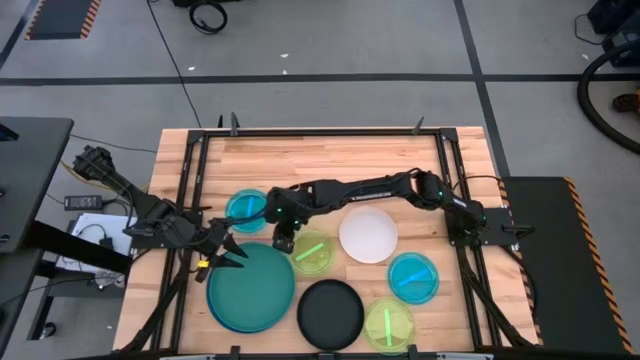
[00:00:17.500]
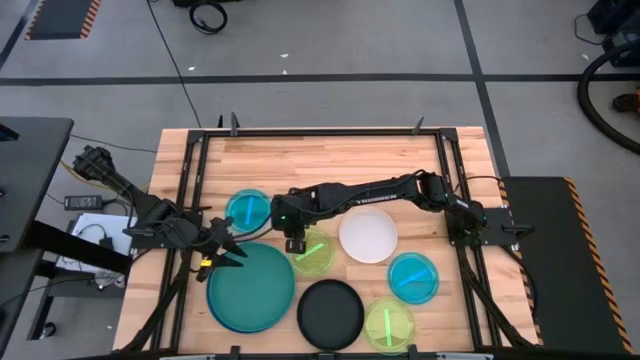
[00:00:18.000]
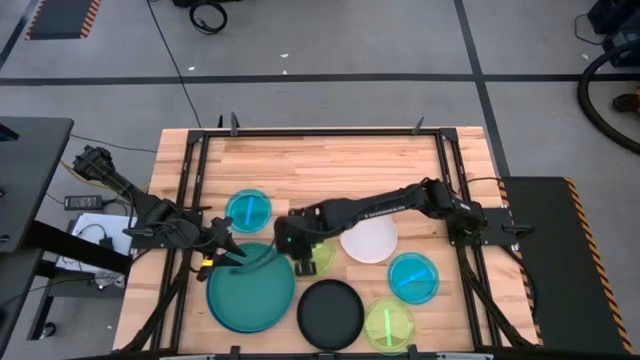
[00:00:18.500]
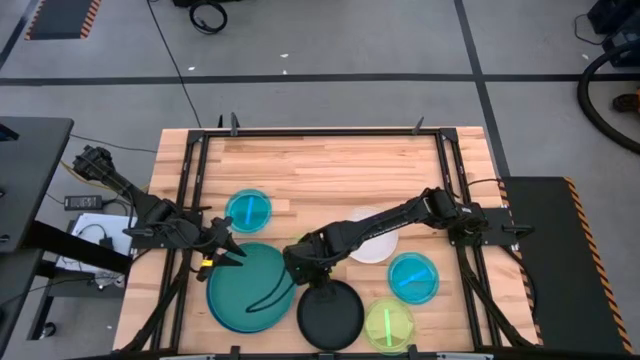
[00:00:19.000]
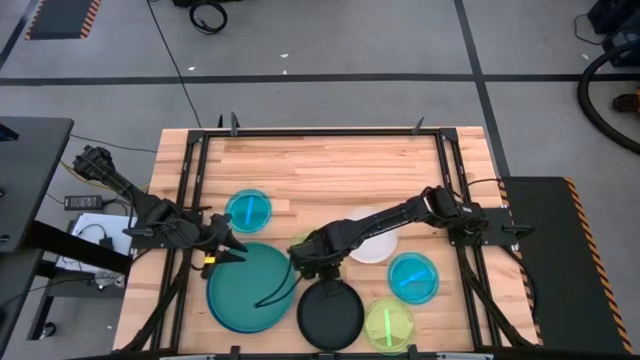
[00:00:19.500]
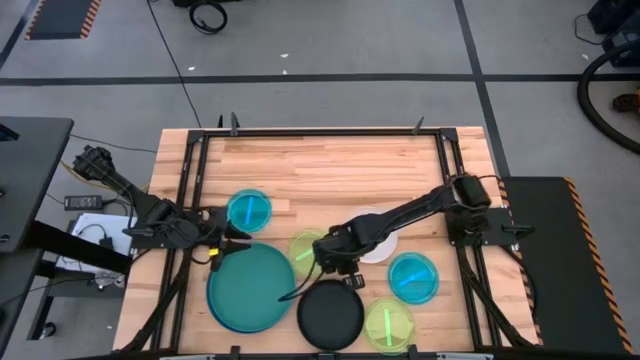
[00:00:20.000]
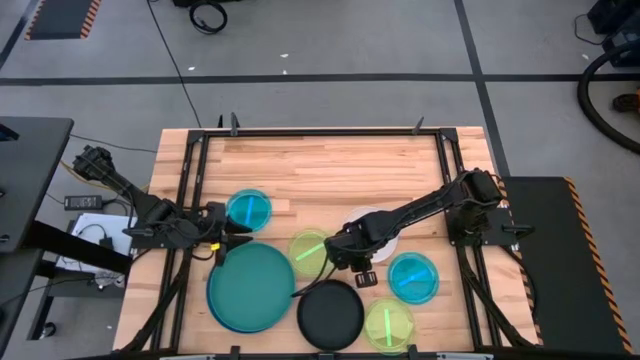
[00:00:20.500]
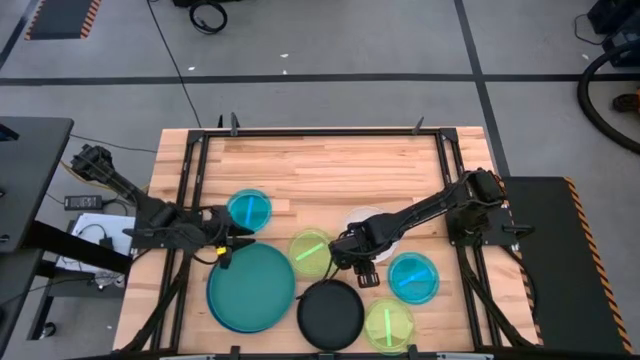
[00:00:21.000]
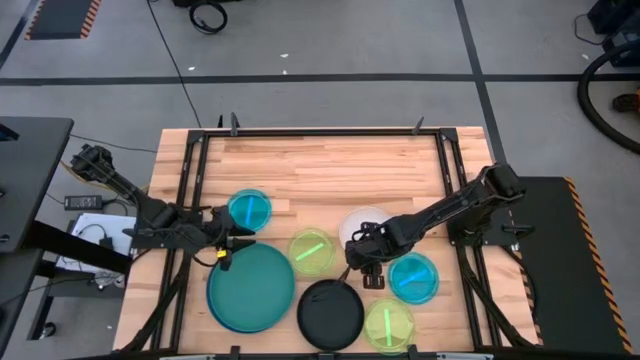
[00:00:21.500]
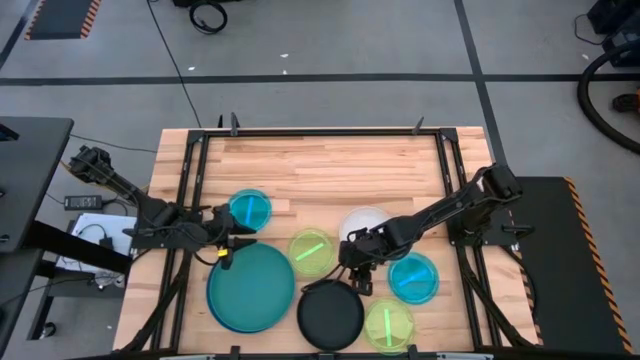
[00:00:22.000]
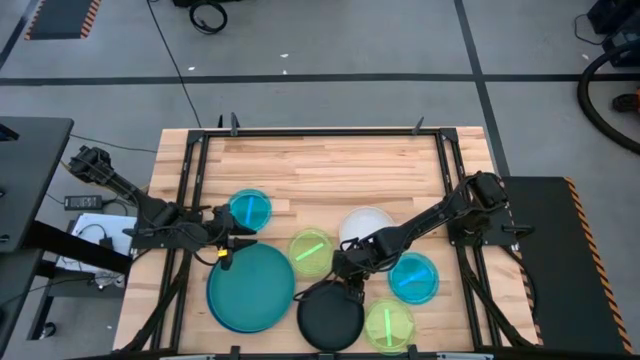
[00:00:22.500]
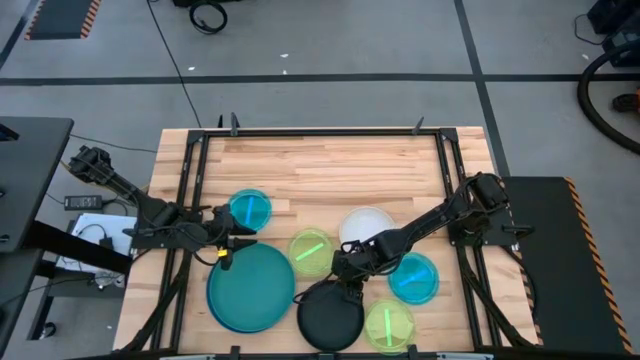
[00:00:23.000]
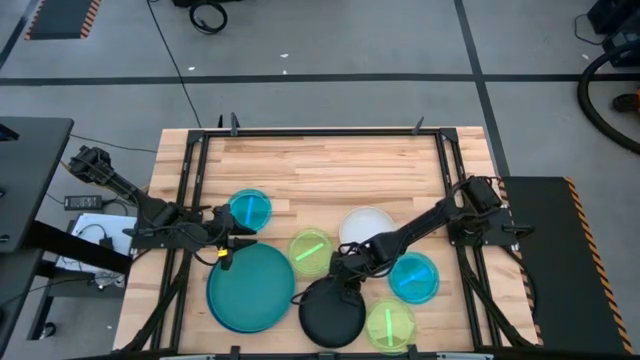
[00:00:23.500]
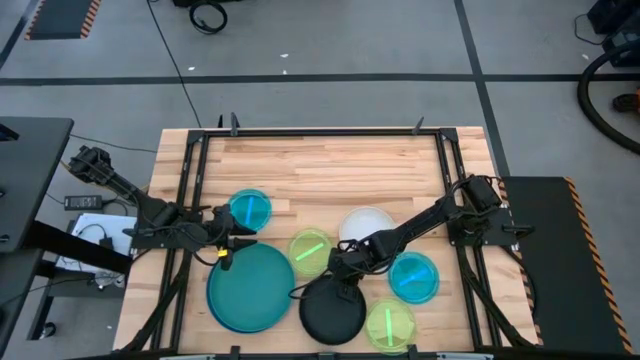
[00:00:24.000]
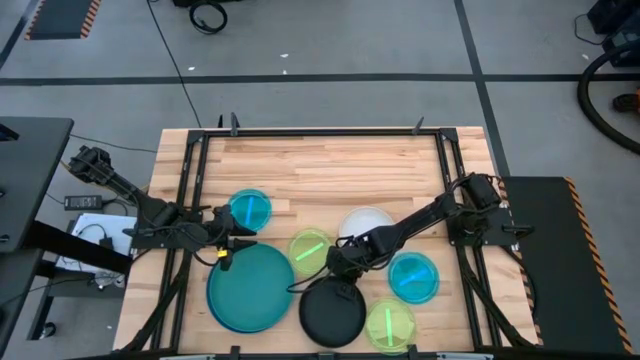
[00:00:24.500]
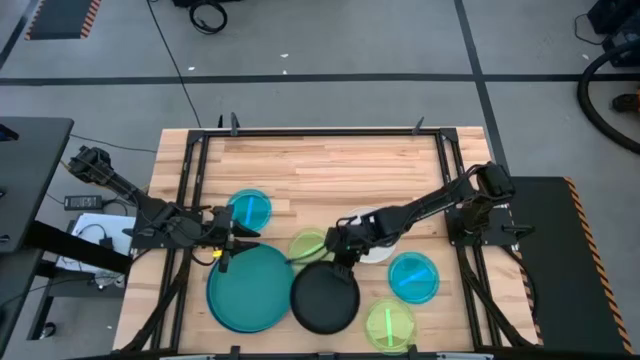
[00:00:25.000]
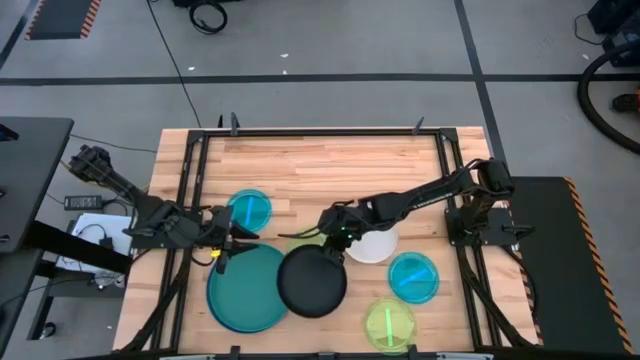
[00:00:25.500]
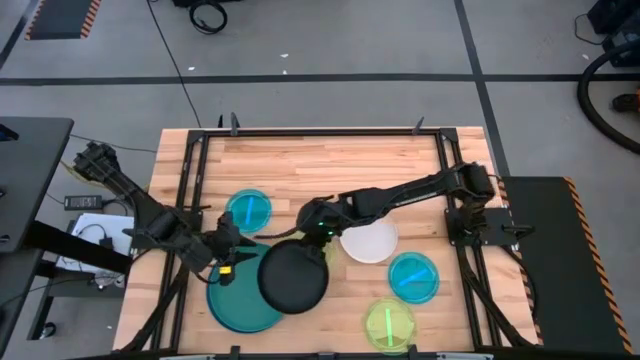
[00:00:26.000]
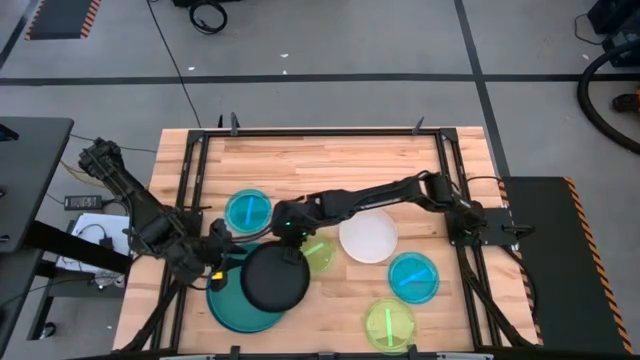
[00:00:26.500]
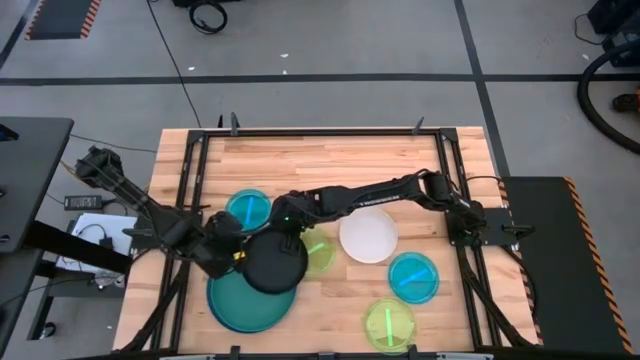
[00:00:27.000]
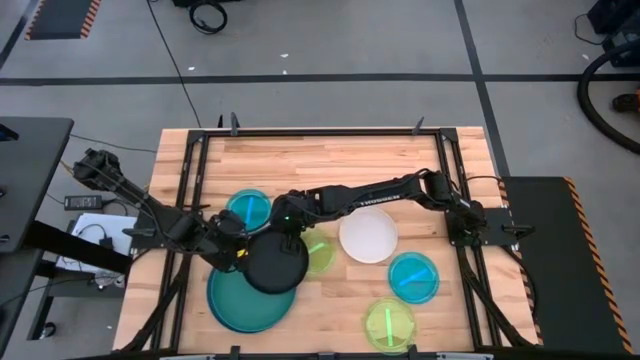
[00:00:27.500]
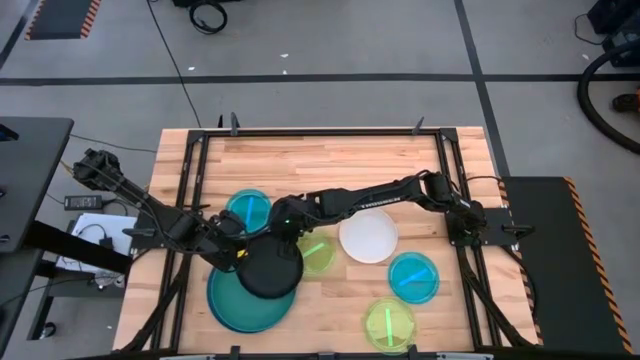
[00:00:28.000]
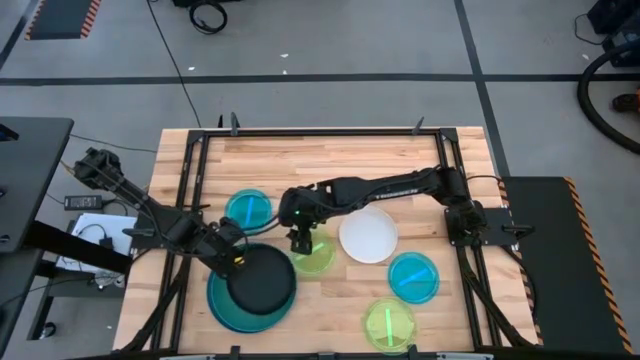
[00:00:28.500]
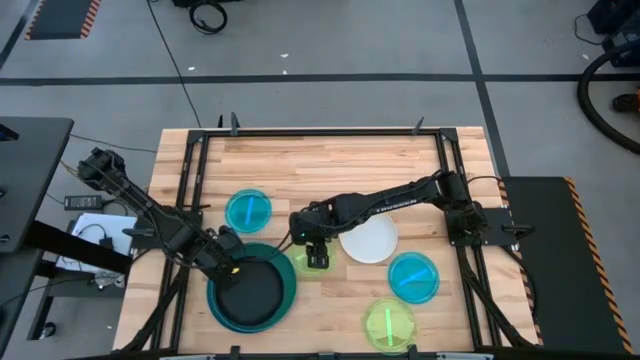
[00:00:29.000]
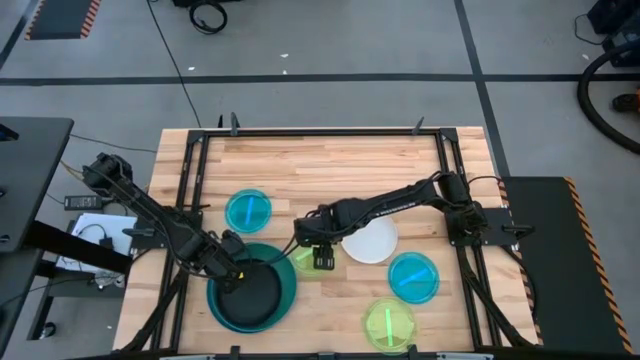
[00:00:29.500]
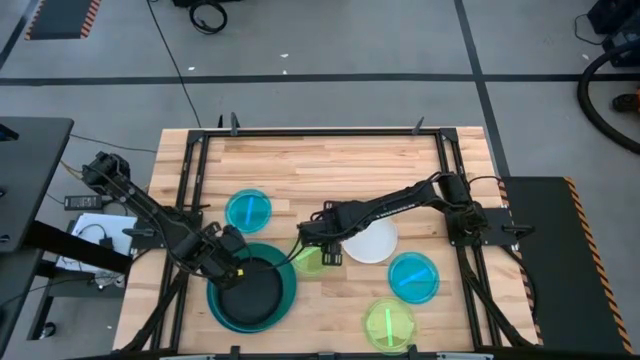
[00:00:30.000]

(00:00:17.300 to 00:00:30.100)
Task: Stack plastic plates
Stack the black plate on the green plate

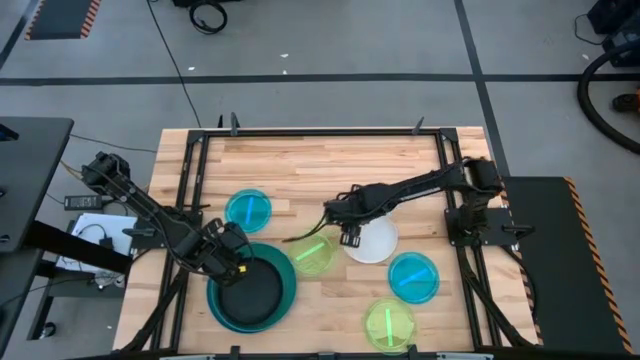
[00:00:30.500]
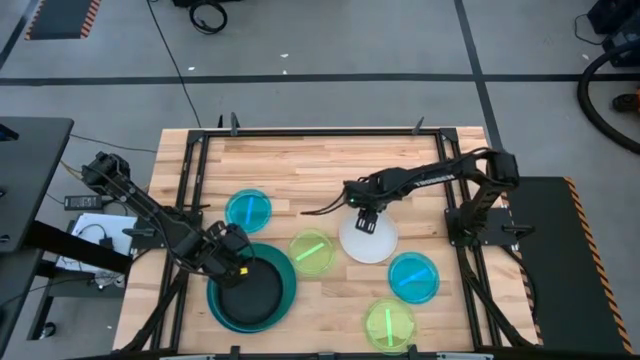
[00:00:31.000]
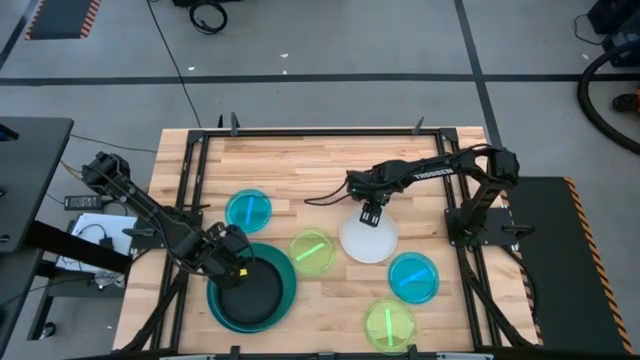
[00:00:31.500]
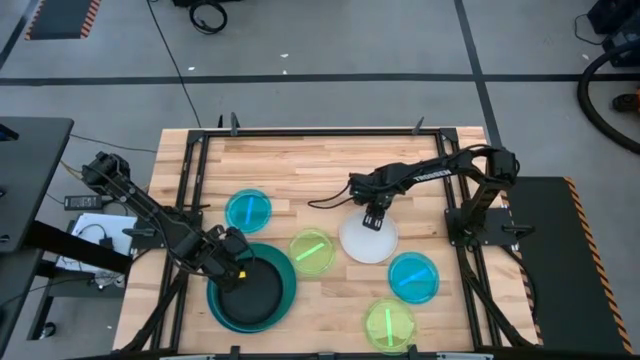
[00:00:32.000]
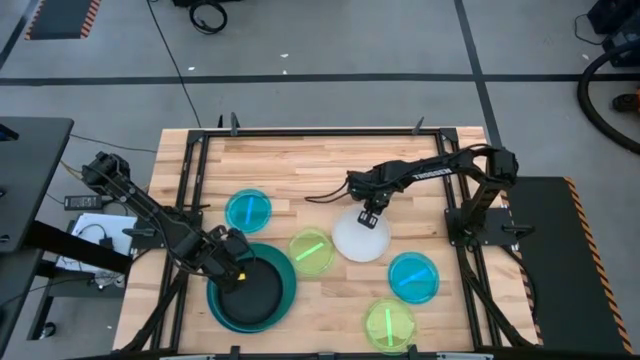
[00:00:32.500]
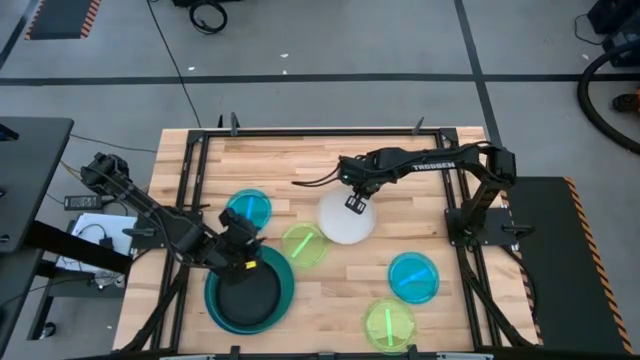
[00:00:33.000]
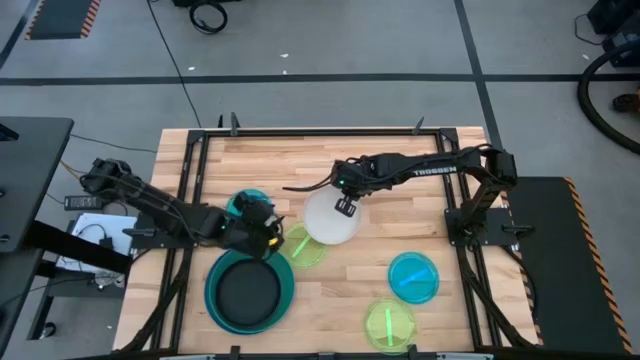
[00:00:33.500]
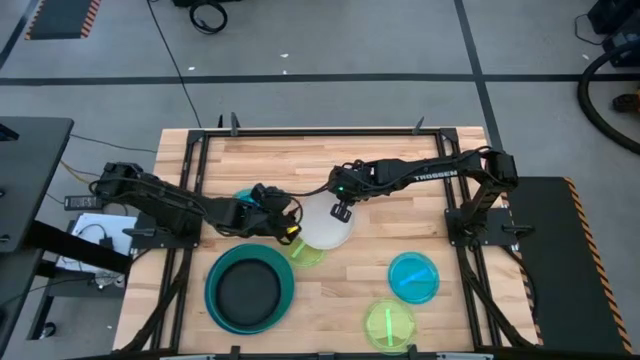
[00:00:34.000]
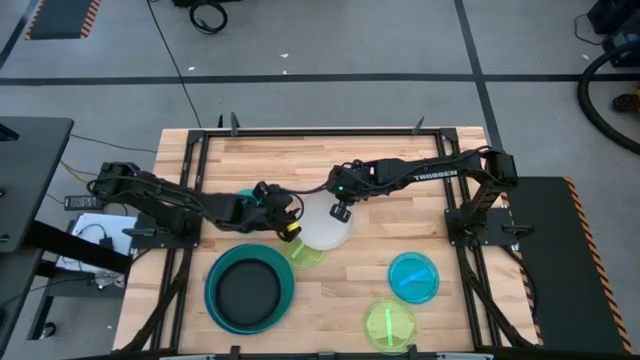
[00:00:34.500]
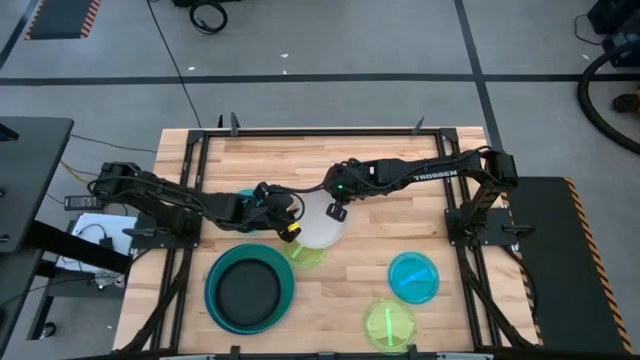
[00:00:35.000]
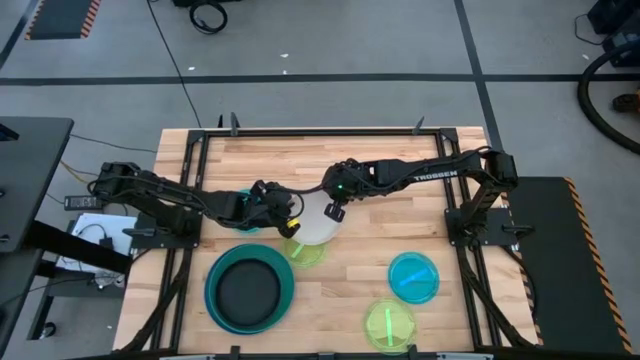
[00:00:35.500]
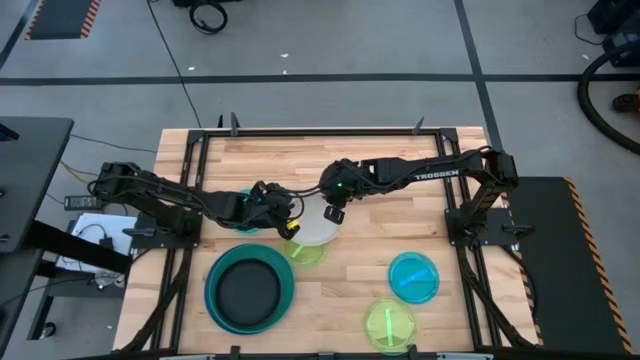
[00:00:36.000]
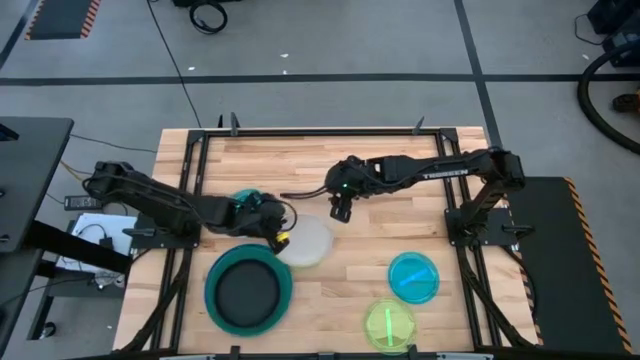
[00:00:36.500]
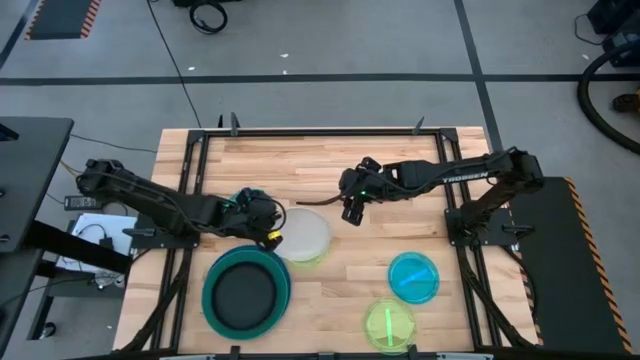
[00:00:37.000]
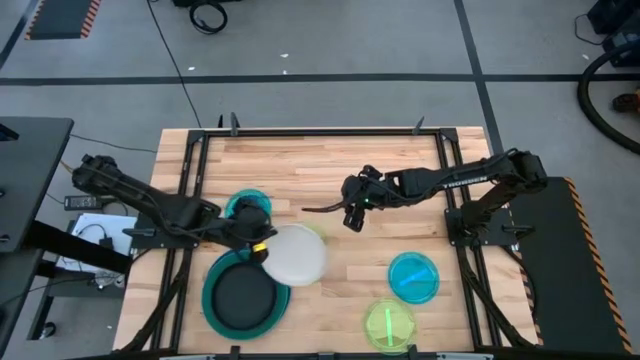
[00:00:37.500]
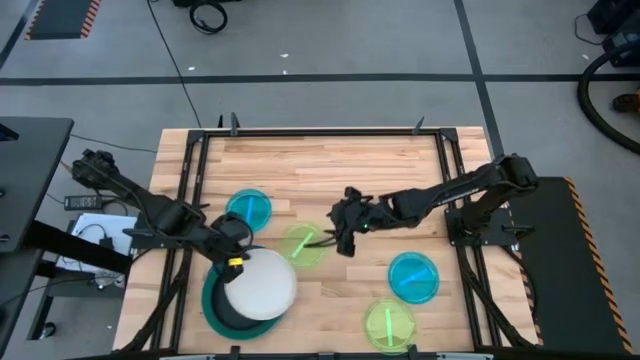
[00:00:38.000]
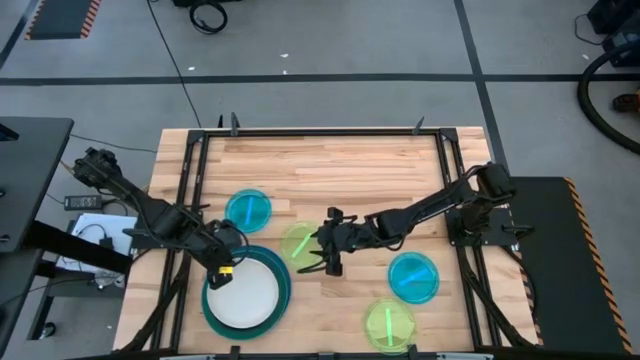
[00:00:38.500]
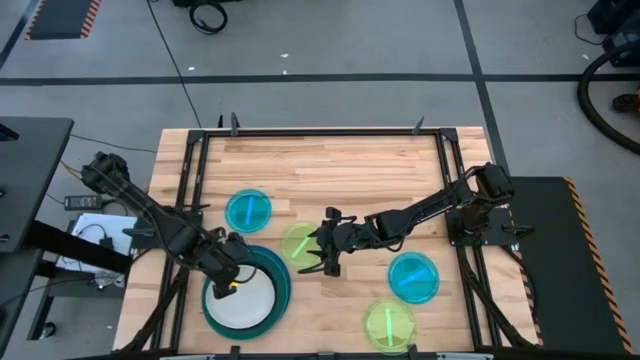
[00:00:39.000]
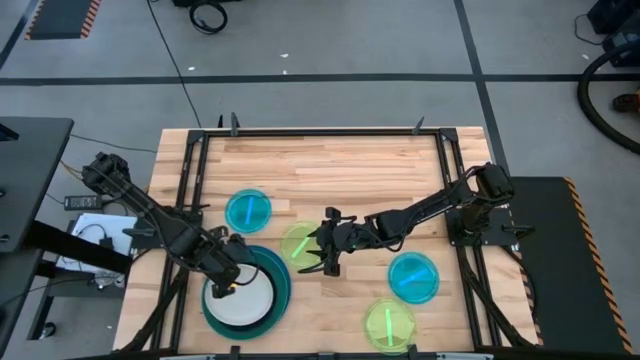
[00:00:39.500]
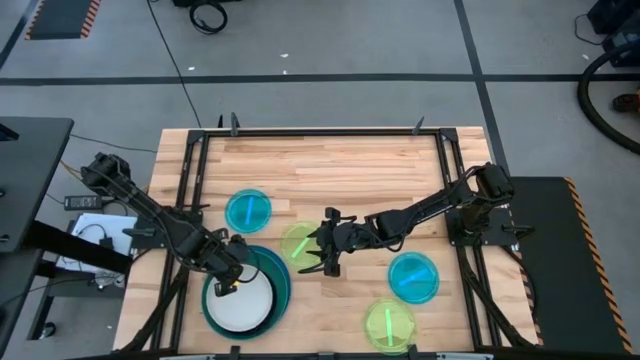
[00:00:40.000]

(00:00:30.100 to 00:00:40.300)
Stack the white plate on the black plate
